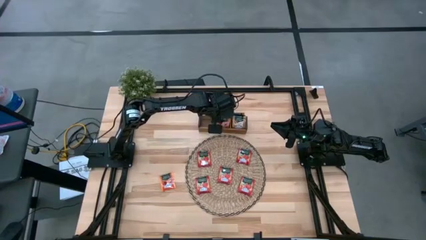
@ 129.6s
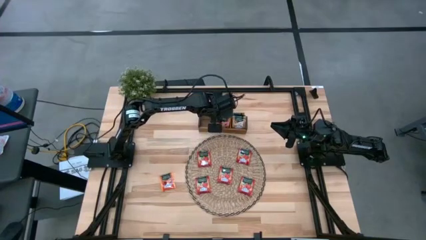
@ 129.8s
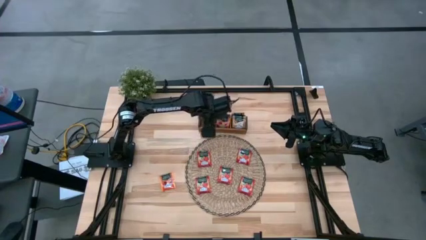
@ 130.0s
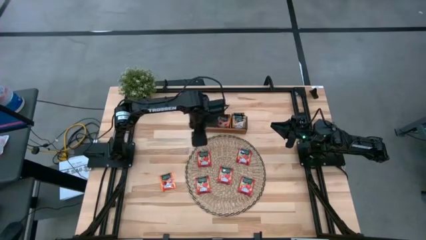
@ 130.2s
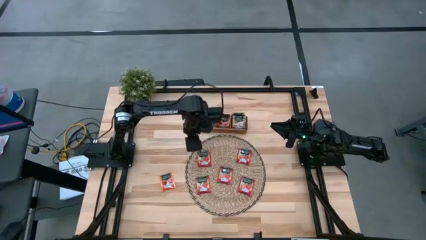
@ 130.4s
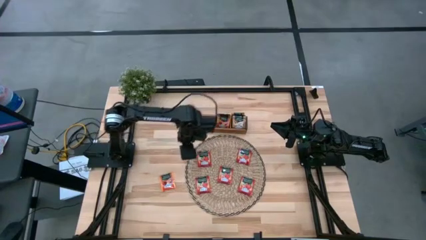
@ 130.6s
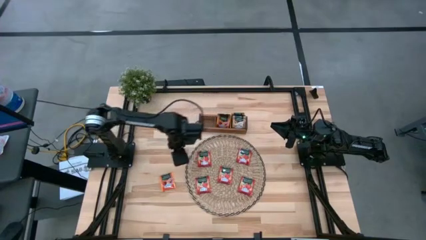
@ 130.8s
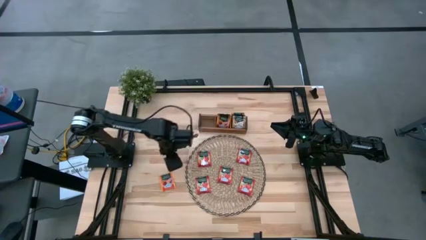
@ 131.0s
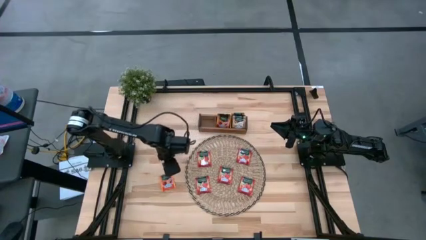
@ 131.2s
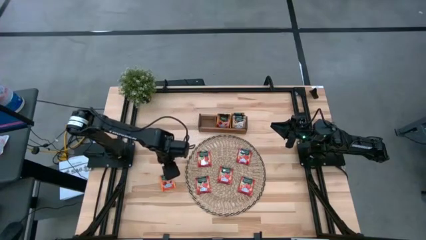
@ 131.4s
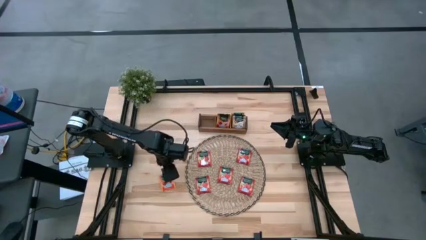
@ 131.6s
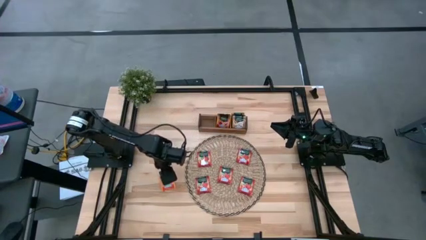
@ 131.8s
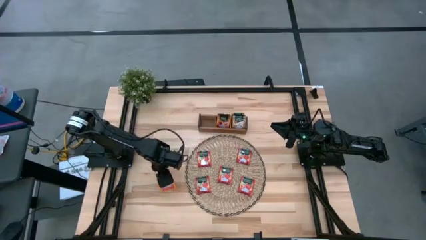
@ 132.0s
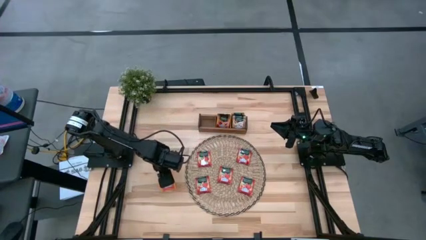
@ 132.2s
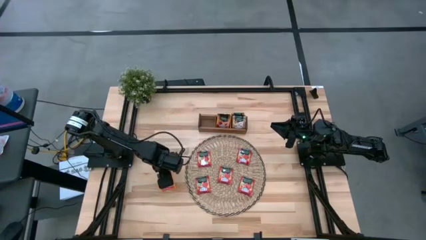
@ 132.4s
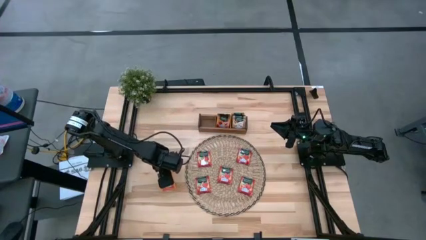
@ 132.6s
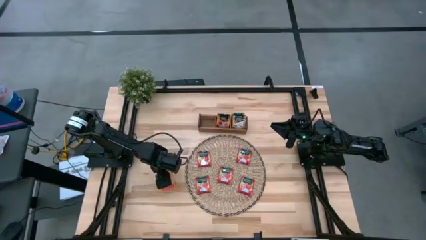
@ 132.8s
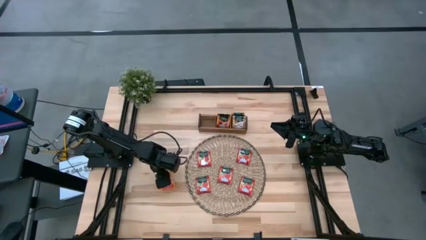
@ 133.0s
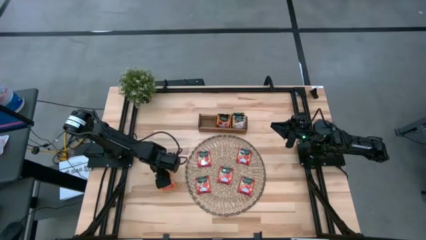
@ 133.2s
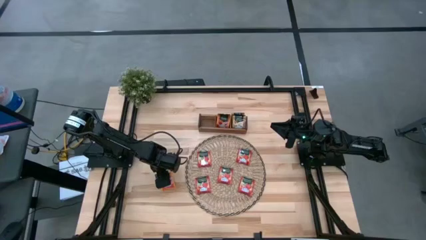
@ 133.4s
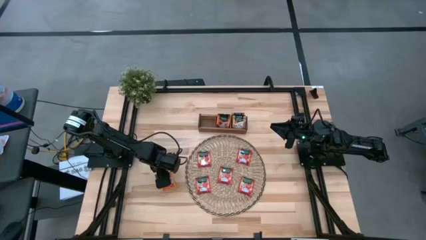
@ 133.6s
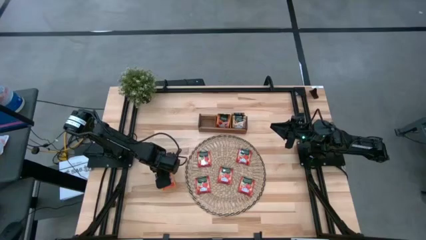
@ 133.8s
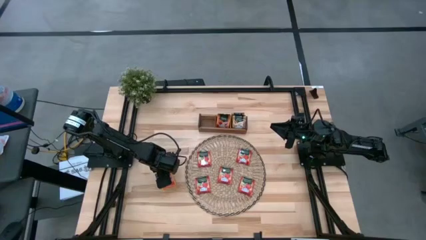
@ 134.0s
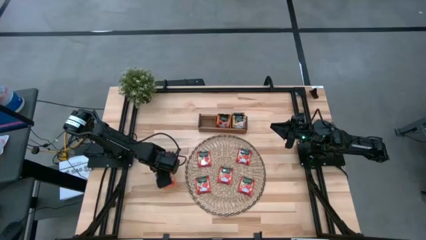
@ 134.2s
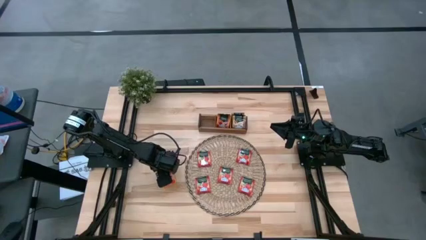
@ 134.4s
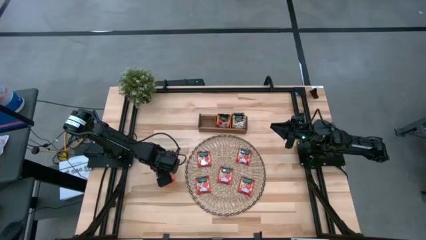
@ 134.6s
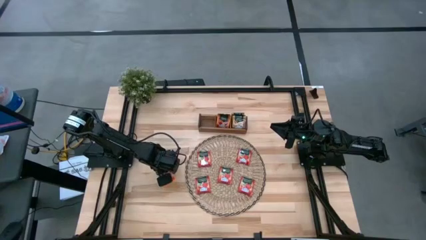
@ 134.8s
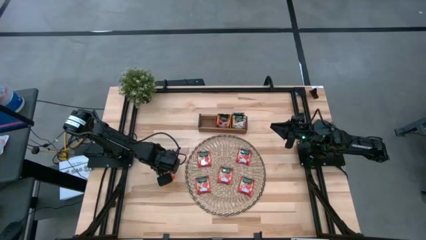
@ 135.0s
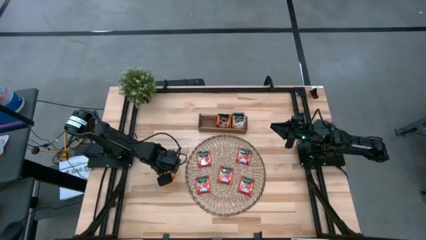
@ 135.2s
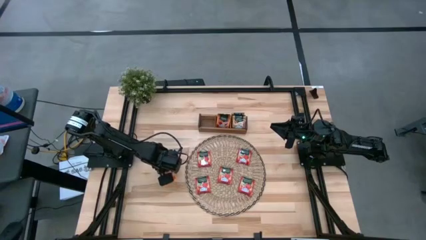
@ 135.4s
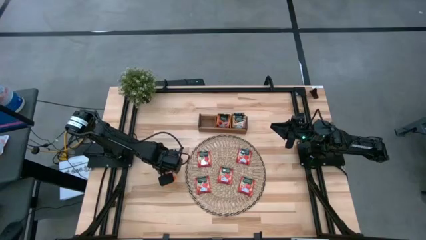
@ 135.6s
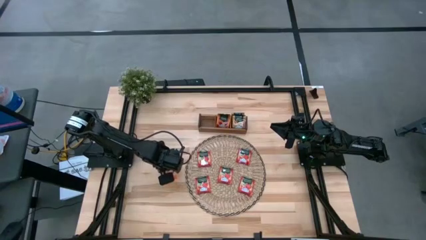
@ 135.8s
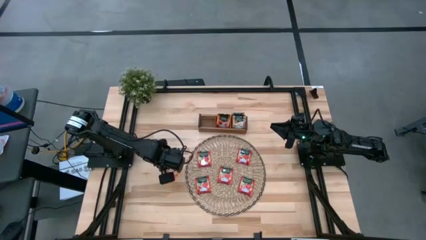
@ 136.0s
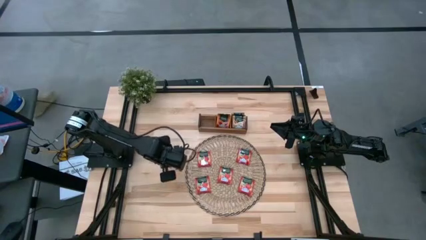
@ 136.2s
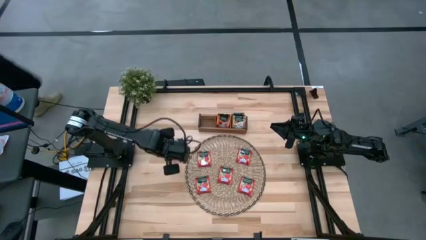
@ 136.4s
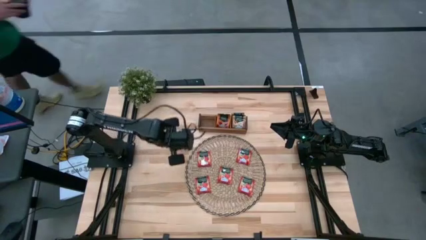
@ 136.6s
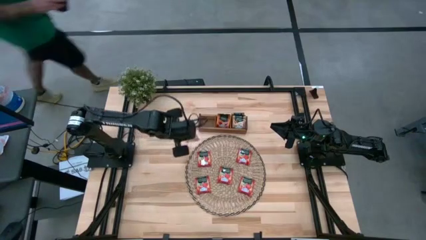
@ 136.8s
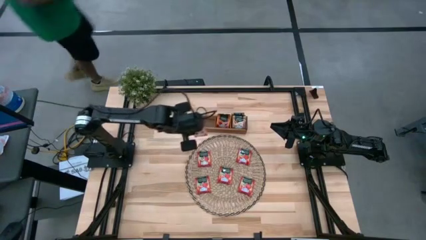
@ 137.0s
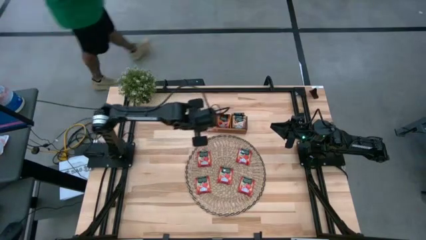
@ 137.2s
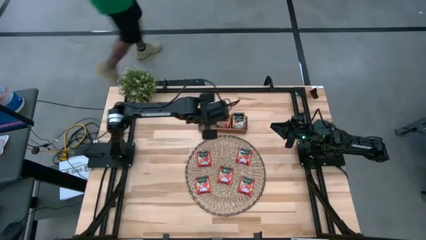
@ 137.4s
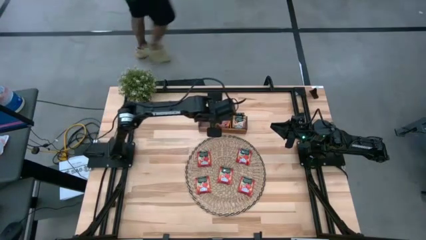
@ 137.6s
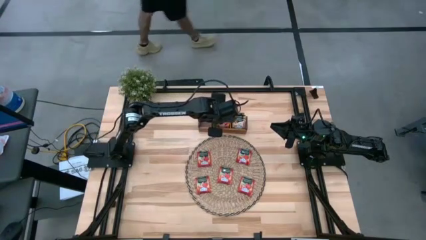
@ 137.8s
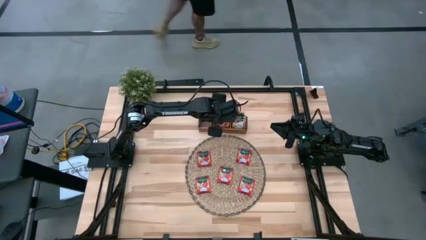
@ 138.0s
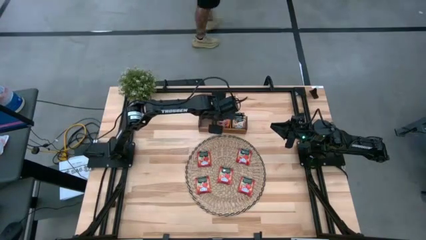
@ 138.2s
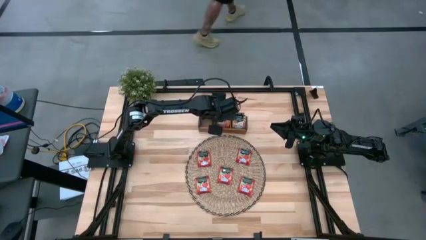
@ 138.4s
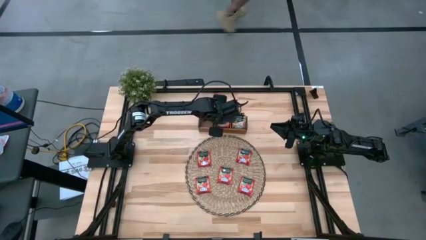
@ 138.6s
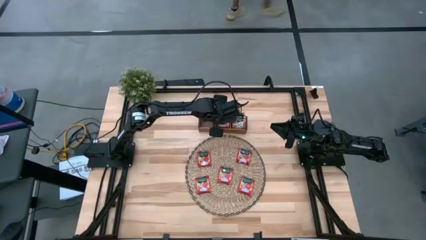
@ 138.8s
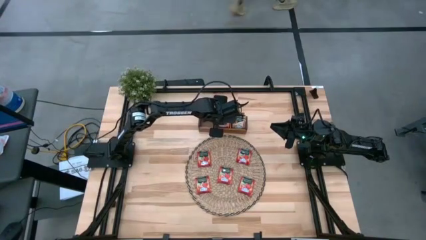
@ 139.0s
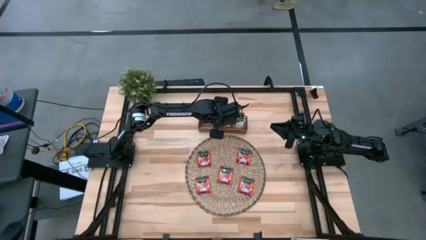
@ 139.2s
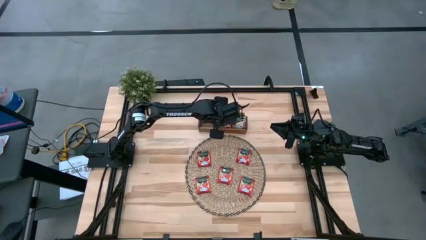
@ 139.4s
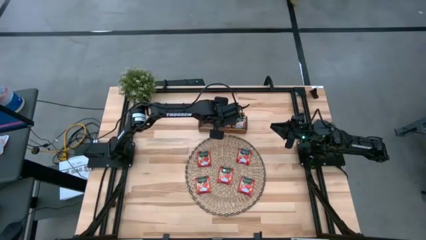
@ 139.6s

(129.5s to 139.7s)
Task: Pick & Place Tea
Put the pink tea bag into the middle section of the wooden organizer

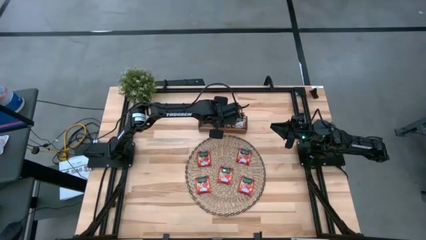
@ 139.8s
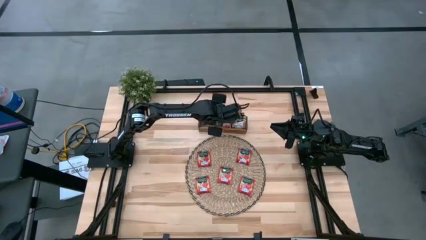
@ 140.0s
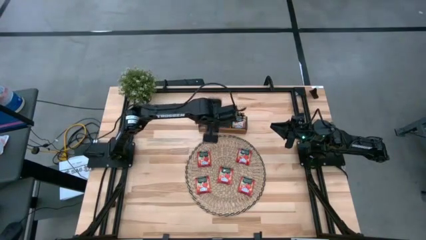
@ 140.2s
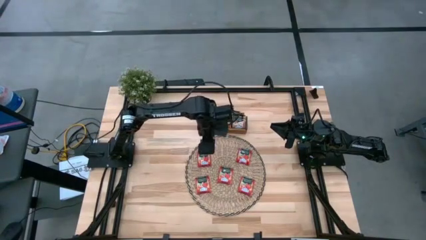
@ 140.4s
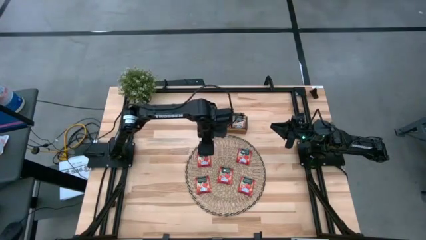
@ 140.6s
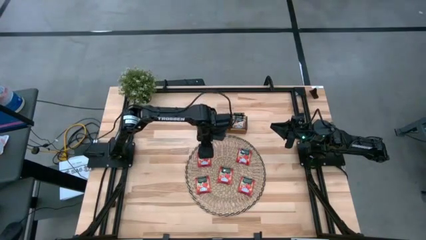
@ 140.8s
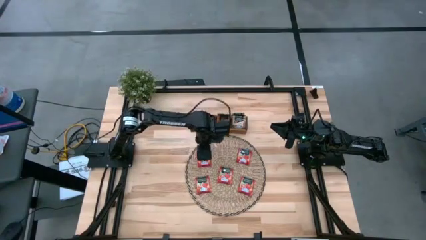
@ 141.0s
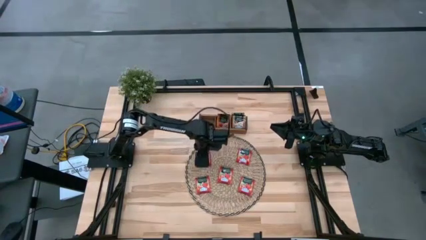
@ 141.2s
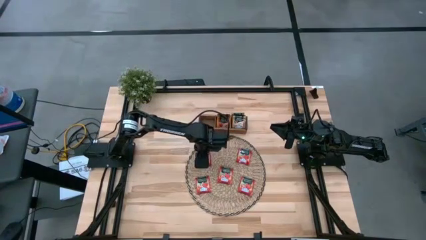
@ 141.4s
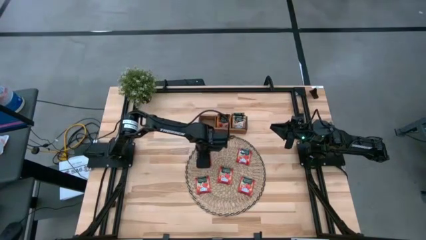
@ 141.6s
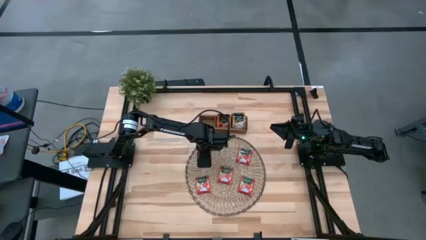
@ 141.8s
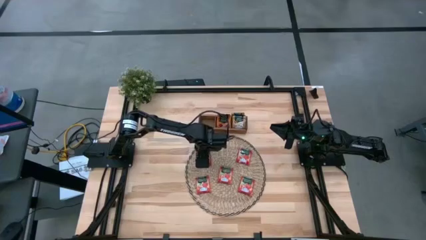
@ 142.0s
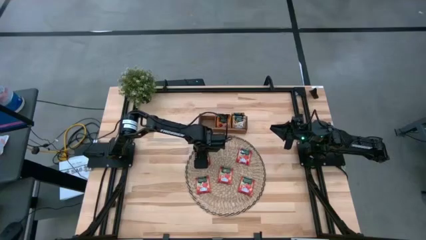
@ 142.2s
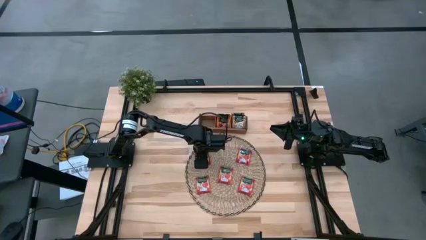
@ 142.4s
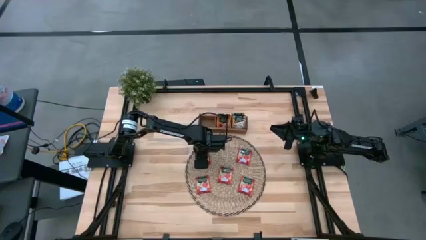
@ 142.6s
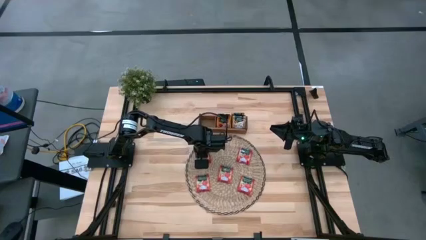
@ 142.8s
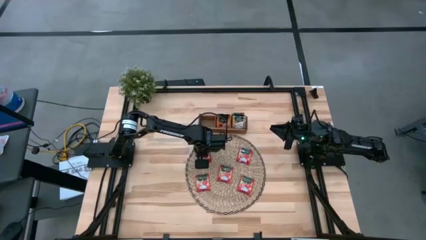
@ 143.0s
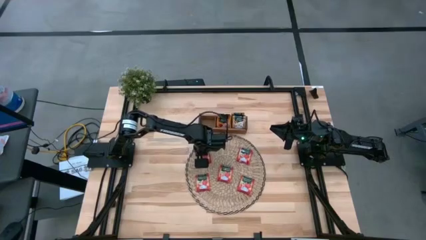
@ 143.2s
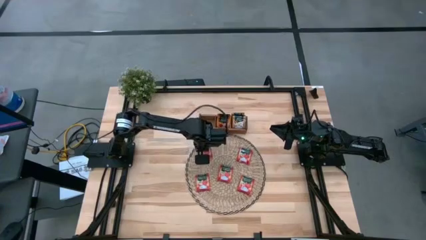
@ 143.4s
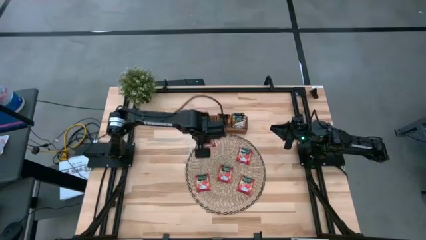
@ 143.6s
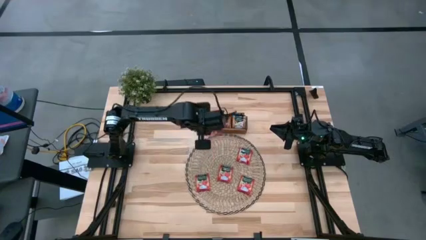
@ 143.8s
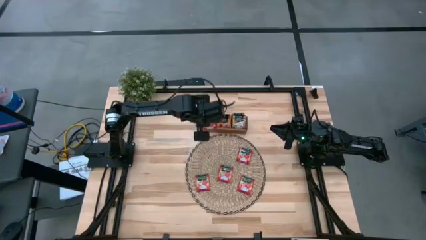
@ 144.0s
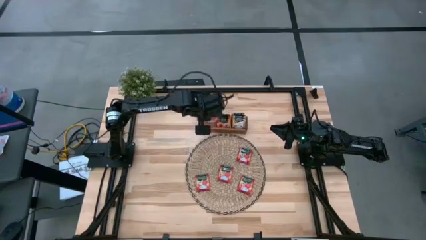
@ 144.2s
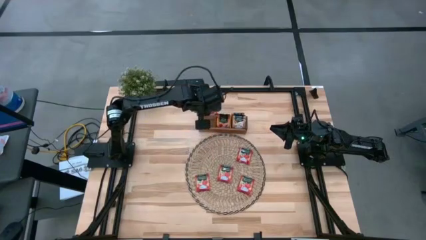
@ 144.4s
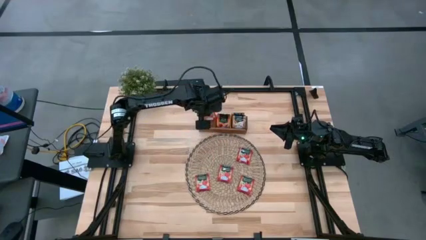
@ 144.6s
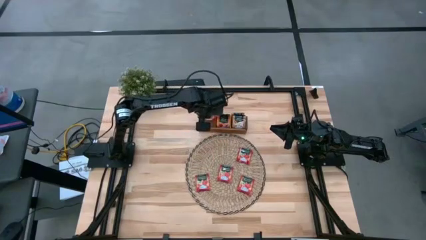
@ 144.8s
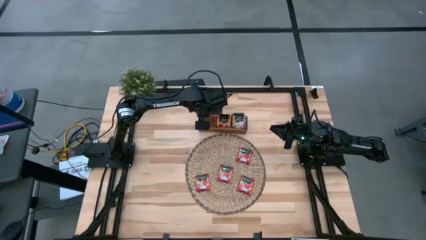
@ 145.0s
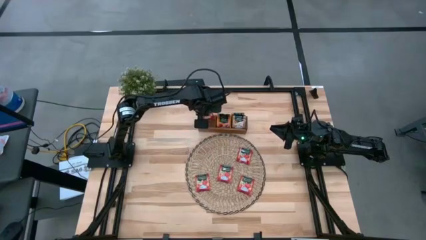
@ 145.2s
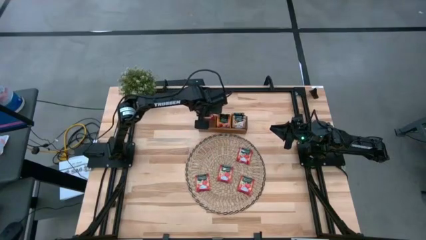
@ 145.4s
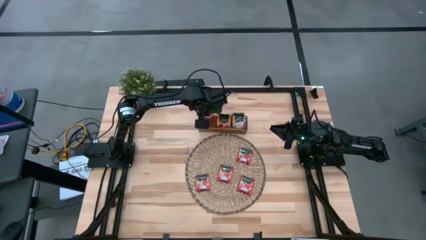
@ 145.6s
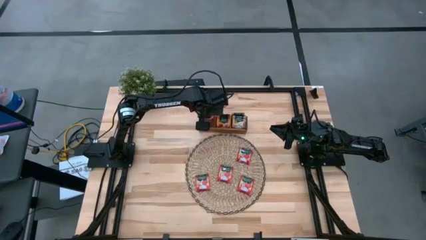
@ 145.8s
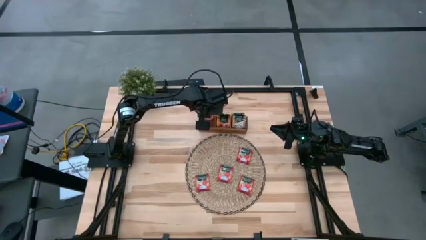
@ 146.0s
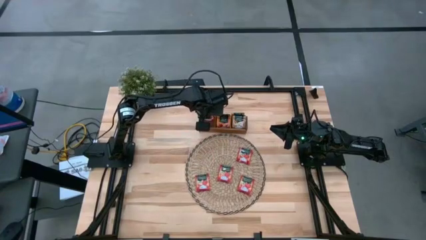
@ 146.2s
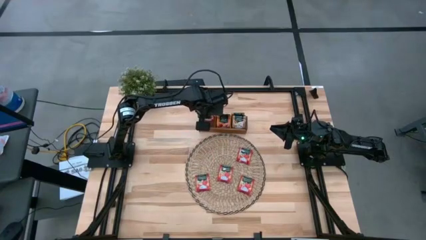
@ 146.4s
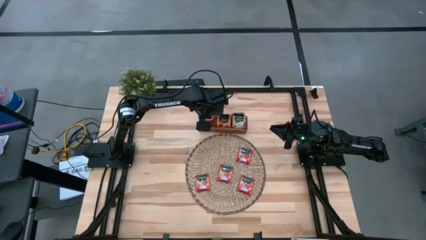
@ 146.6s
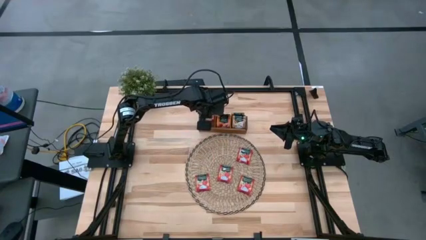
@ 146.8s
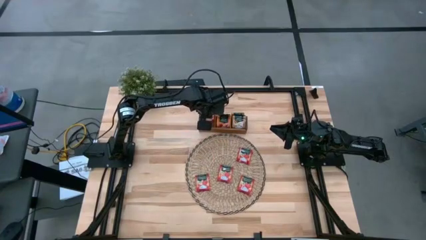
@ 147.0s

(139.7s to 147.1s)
Put the red tea bag into the left section of the wooden organizer
